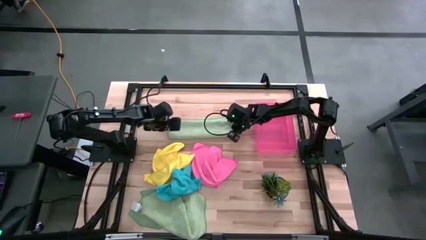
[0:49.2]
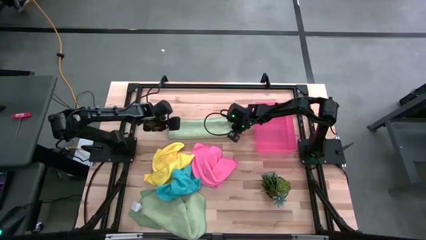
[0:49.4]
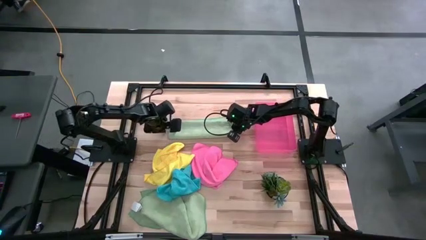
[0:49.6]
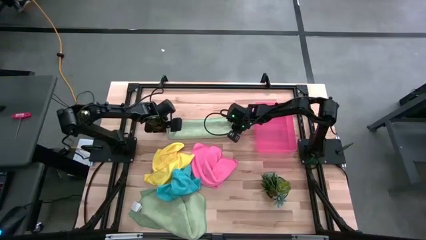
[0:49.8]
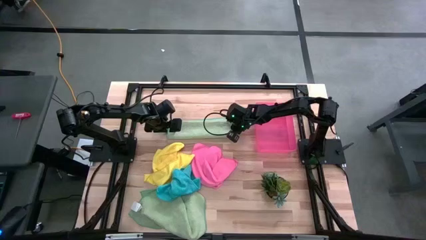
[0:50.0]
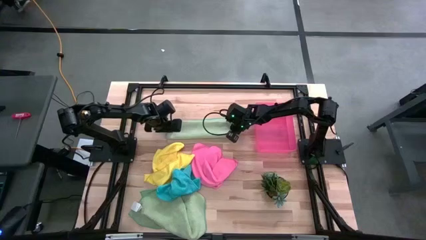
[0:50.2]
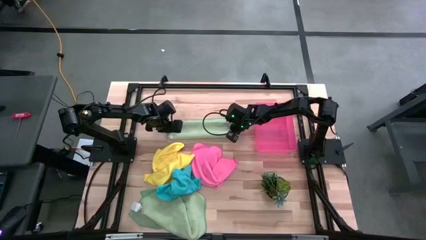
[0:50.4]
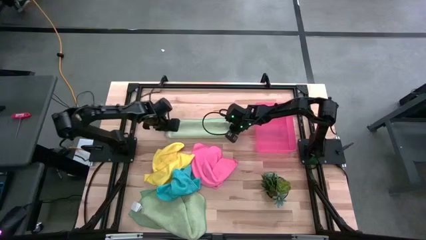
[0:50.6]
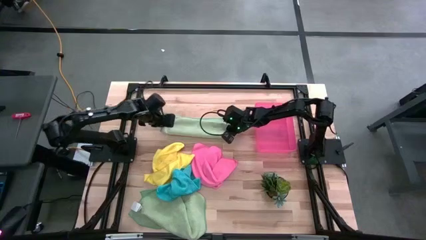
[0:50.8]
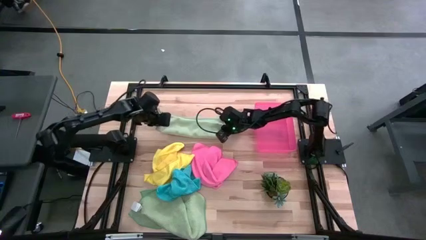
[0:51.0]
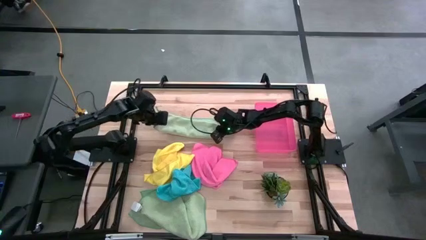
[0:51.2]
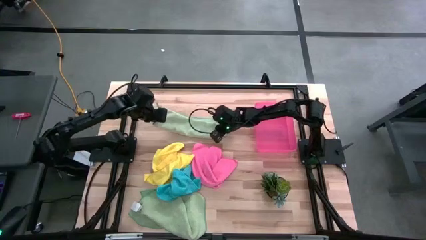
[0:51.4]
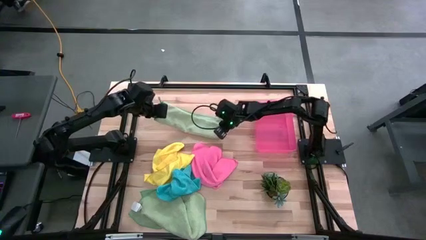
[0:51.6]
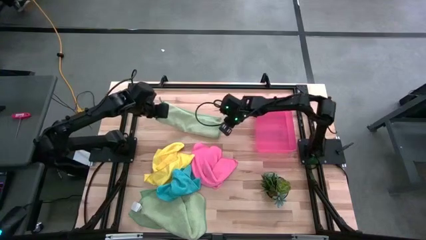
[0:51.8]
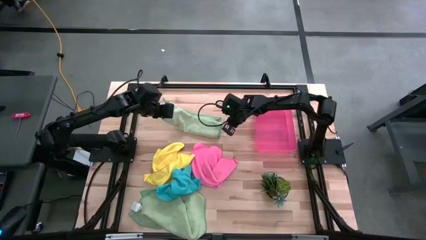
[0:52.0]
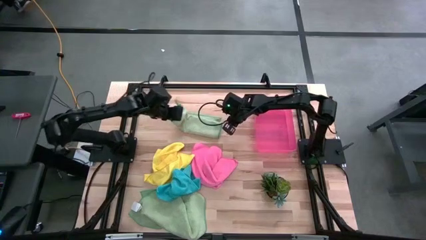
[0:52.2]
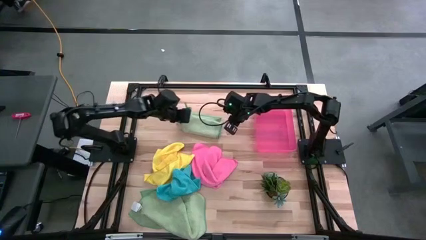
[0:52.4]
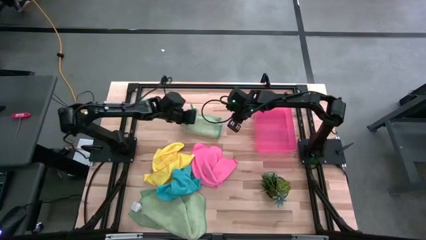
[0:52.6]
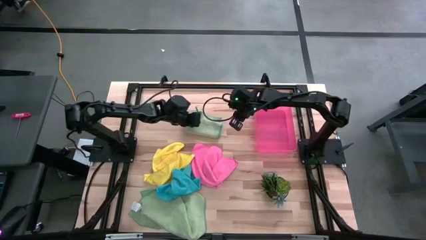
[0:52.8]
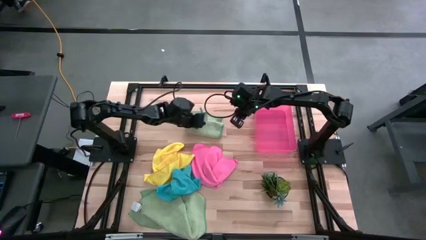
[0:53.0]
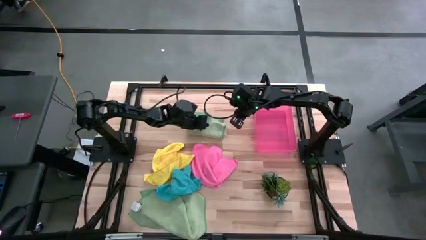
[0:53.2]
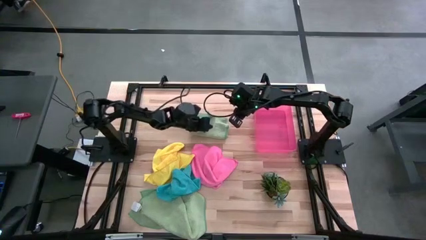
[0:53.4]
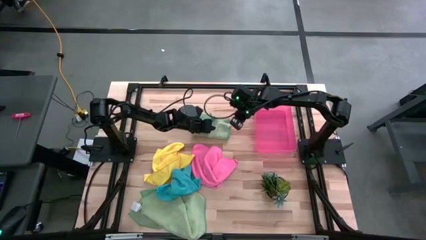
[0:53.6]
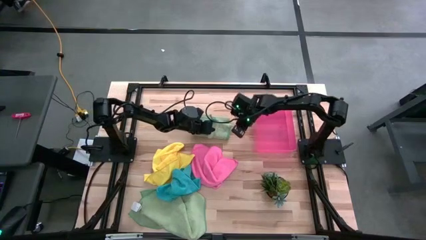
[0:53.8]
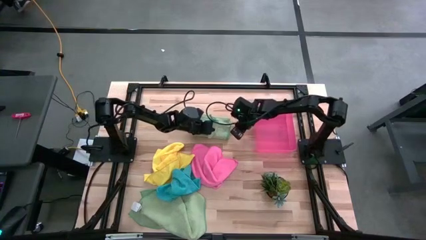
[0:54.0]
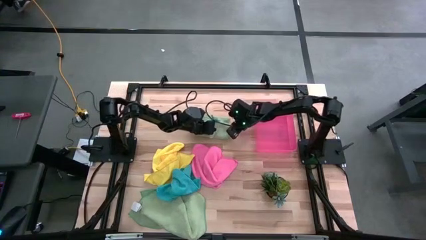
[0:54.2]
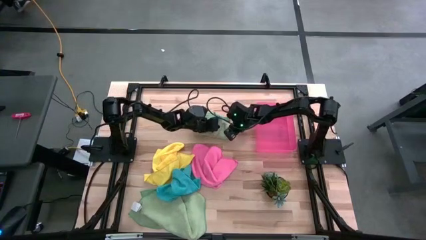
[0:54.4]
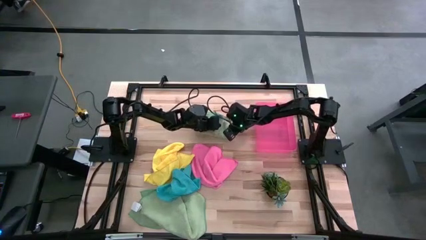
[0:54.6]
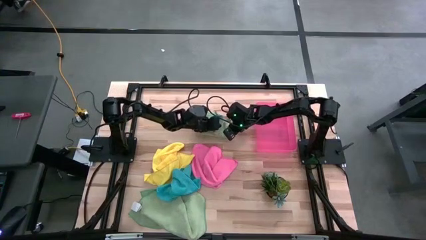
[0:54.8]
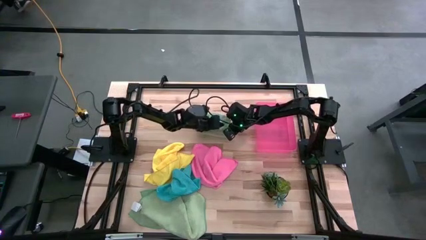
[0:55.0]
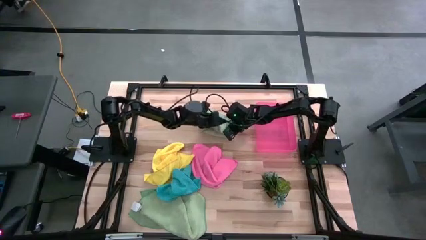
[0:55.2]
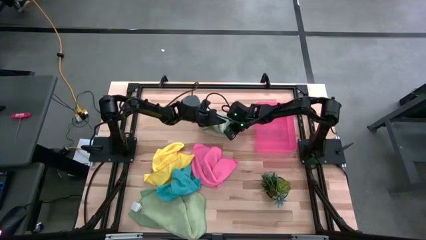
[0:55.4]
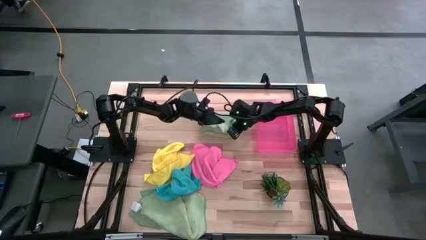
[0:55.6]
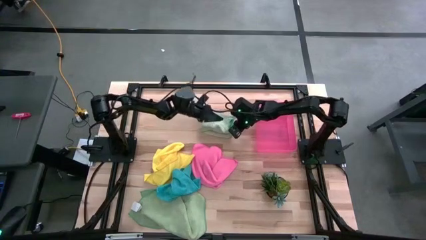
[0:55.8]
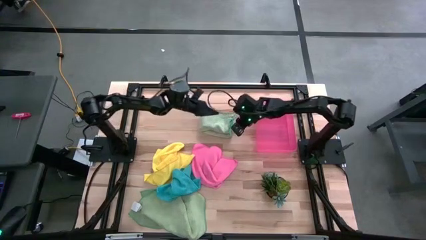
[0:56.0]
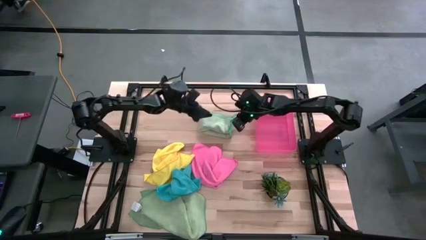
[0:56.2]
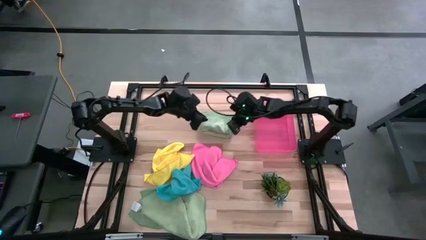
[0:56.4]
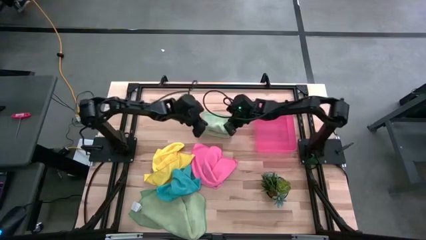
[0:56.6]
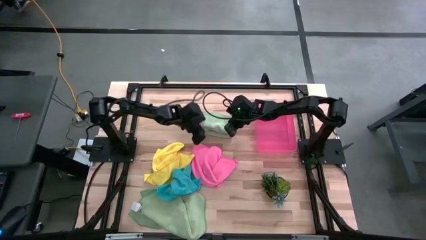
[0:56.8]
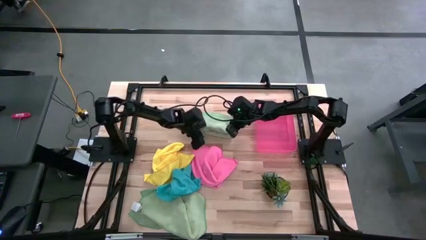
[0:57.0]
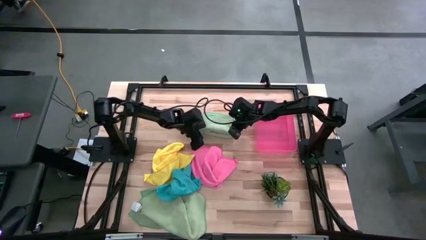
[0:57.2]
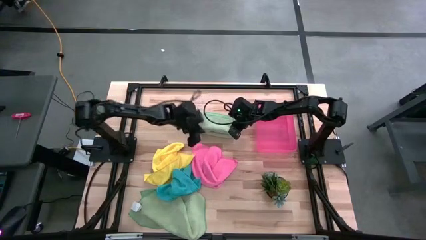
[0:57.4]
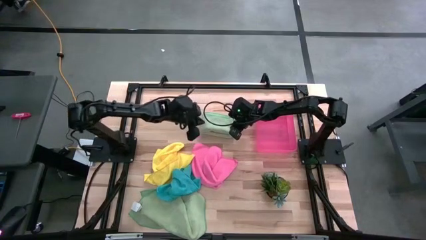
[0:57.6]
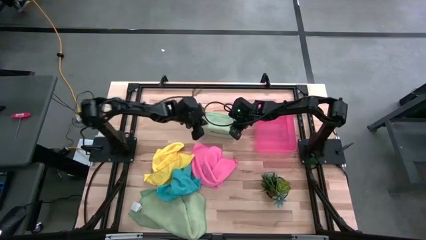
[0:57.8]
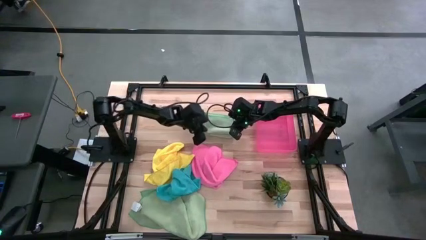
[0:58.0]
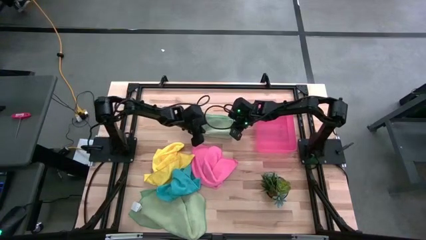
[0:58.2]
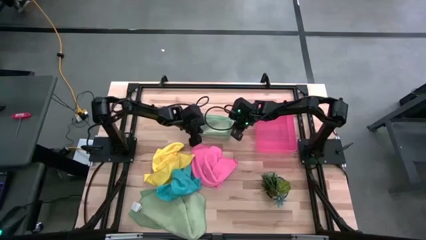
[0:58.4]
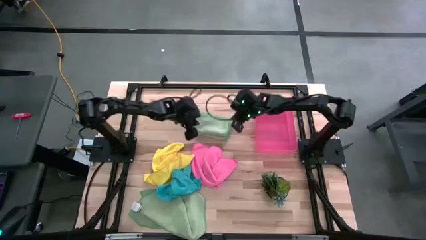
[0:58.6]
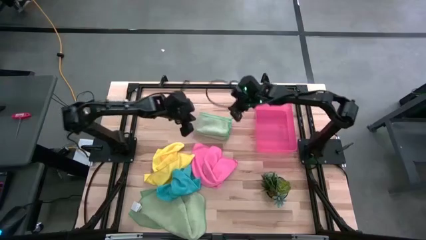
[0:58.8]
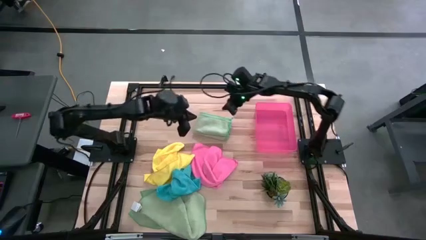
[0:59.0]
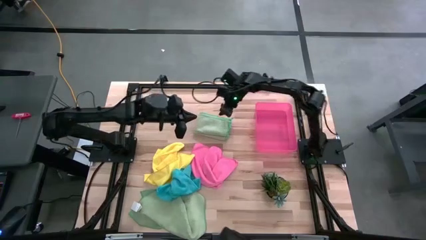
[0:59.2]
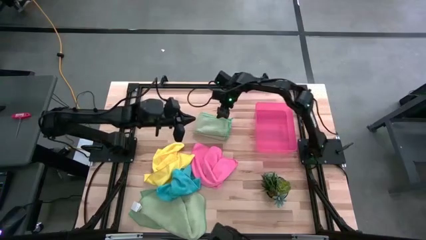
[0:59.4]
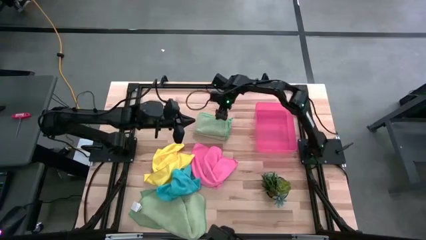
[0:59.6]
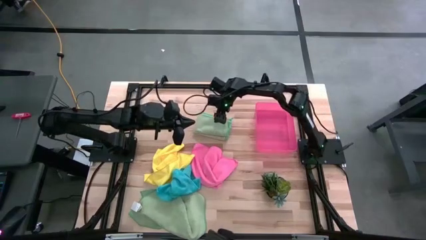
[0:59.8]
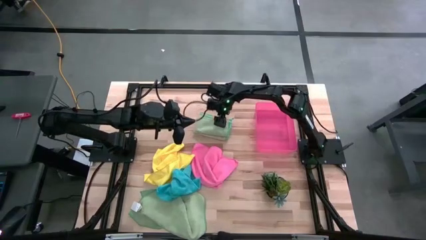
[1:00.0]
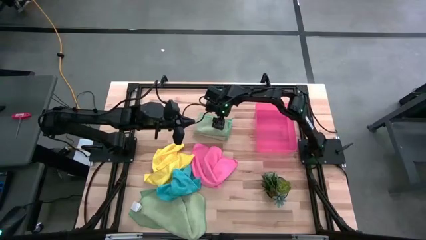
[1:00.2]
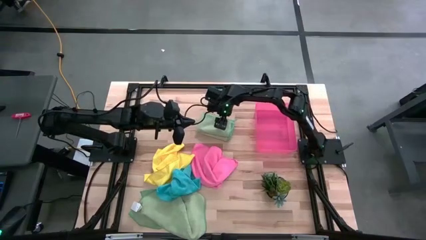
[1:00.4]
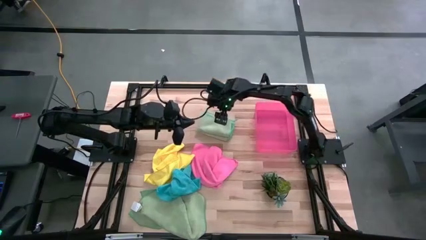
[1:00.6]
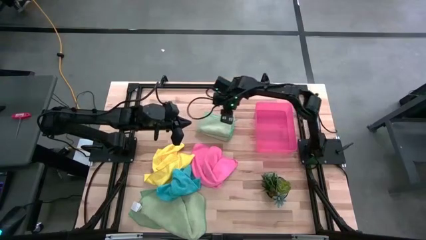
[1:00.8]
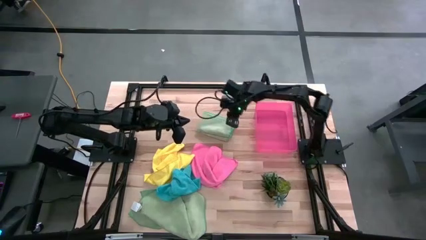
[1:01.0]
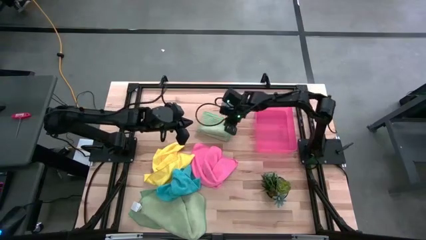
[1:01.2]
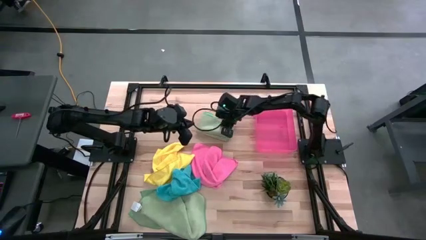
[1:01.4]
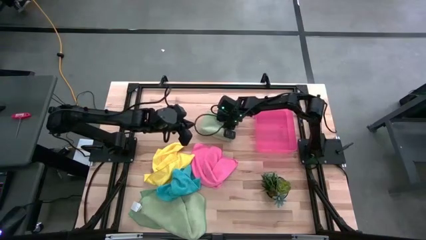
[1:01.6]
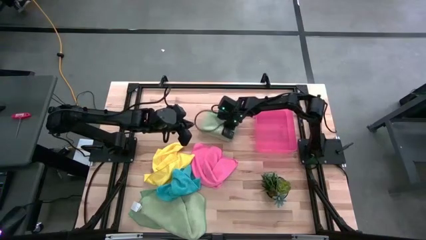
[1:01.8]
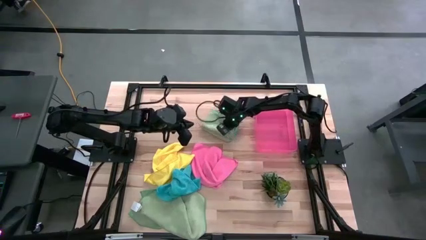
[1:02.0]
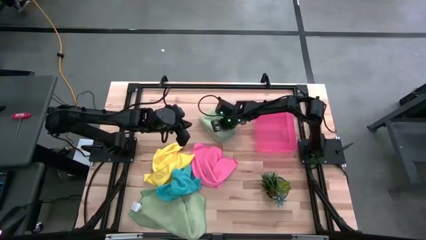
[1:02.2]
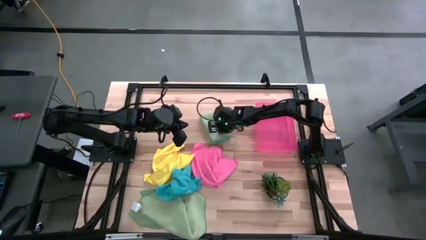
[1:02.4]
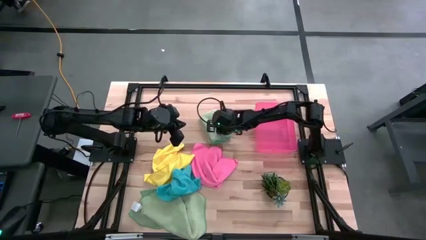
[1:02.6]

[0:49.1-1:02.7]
Task: Fold microfiber towels
Fold the top light green microfiber cloth

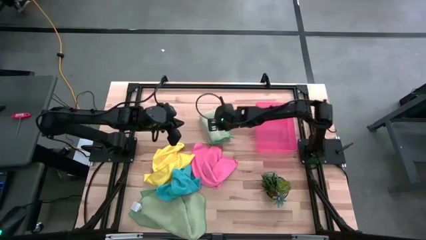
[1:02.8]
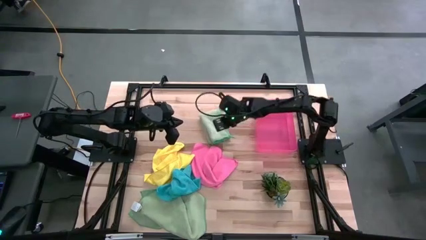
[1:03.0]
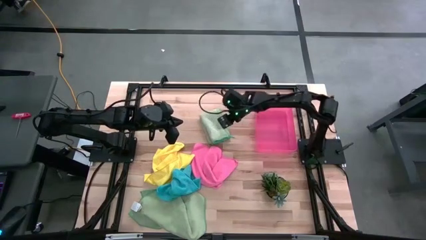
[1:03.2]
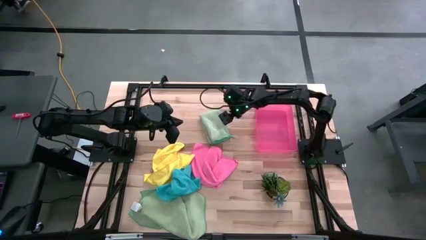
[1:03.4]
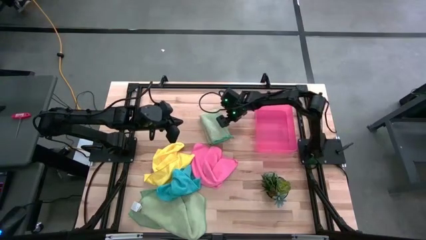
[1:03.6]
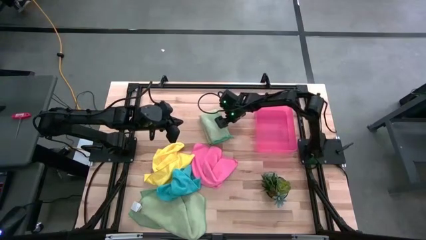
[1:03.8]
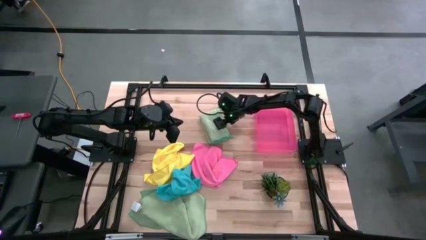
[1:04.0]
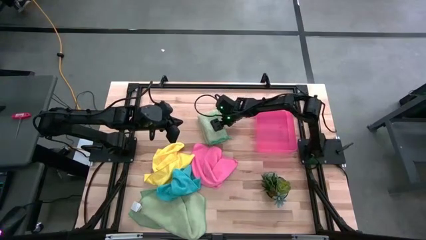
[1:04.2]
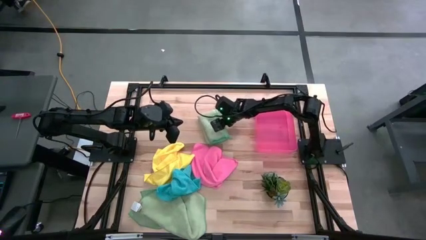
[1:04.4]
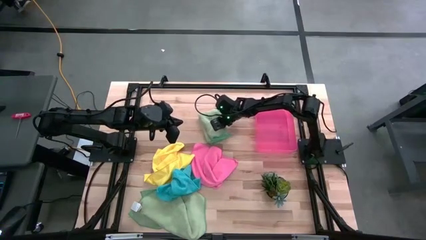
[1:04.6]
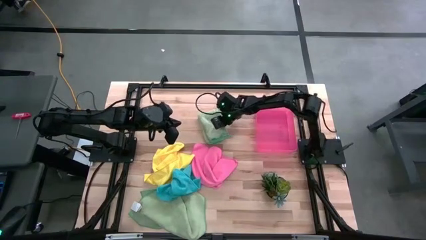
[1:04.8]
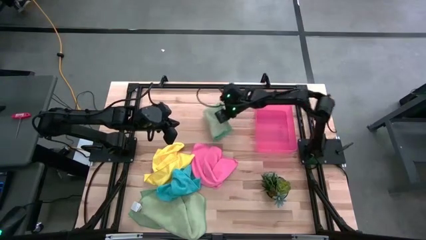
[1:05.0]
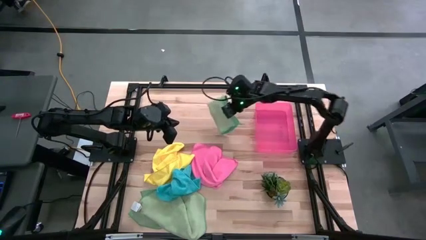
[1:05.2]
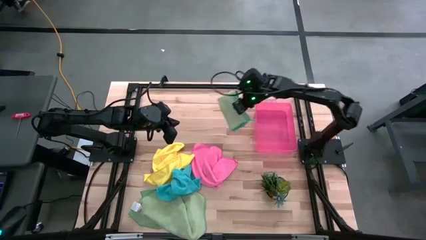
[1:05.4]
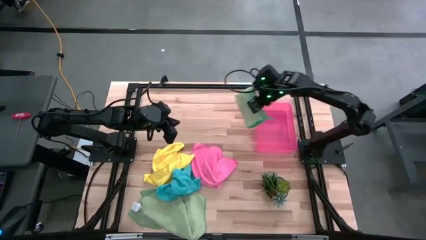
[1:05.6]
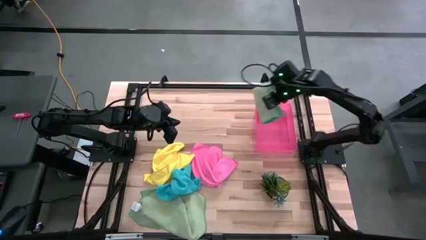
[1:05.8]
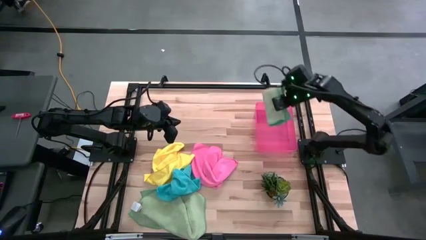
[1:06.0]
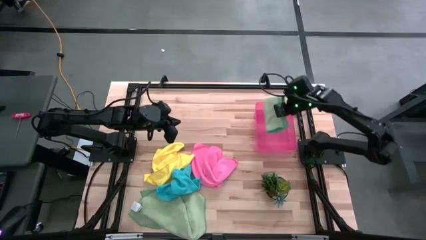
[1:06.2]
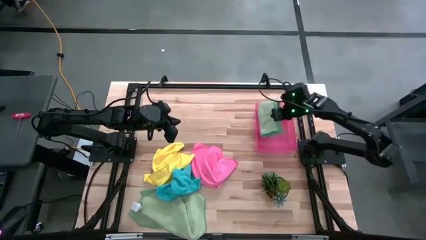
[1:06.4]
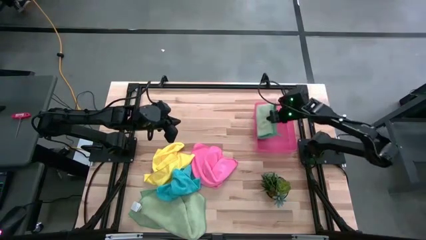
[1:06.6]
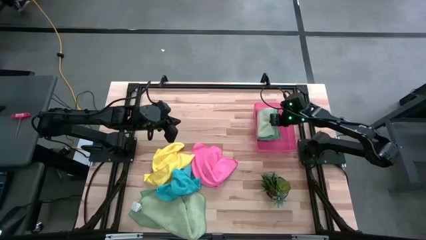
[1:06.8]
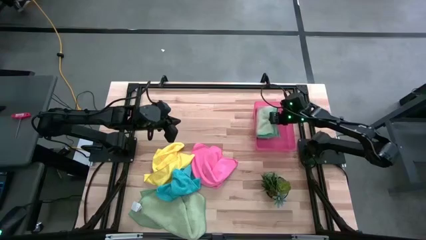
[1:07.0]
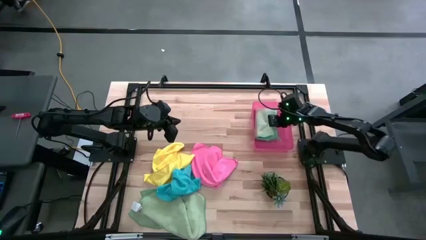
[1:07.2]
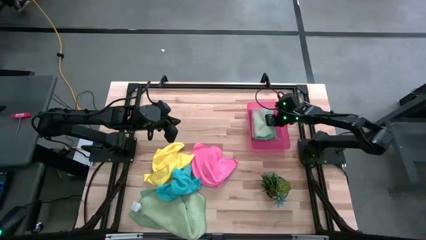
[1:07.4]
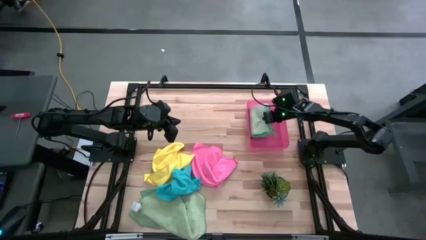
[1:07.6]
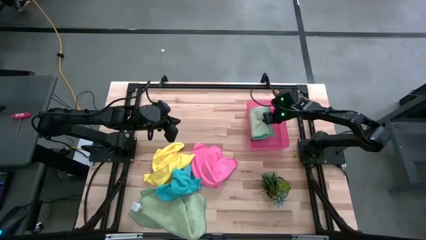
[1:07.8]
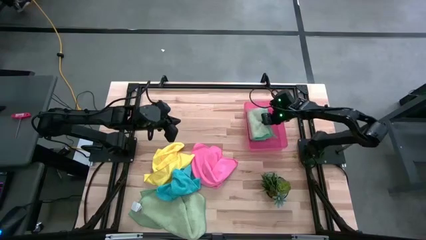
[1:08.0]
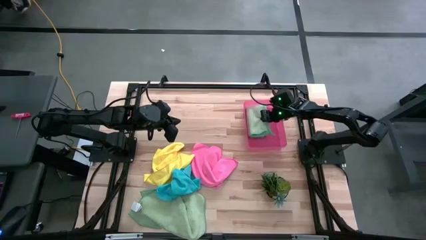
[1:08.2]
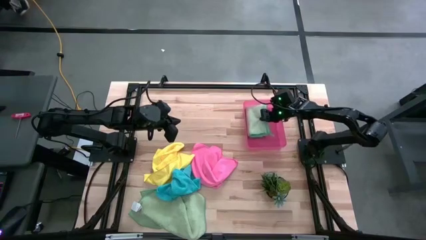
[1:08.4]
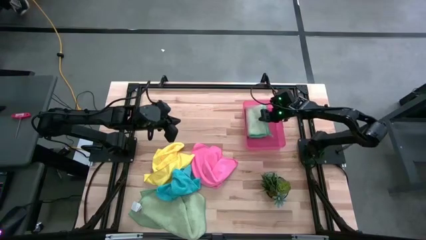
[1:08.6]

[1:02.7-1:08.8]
Put the top folded light green microfiber cloth into the red bin
